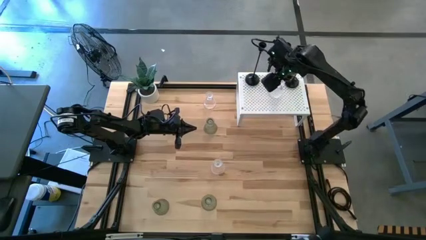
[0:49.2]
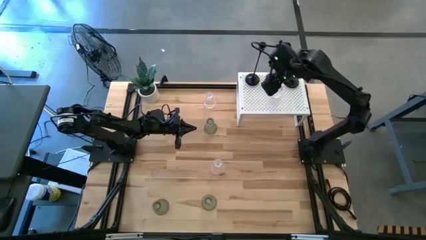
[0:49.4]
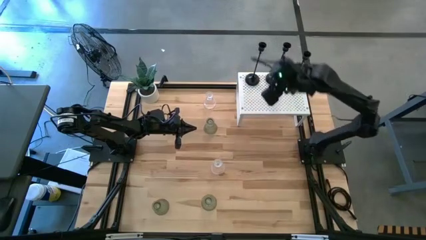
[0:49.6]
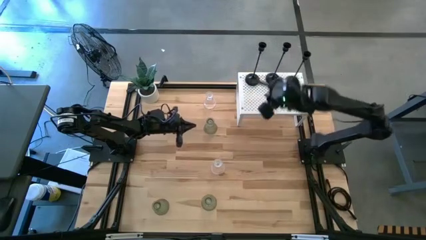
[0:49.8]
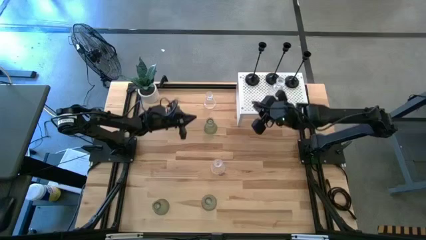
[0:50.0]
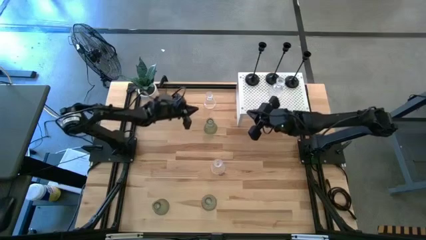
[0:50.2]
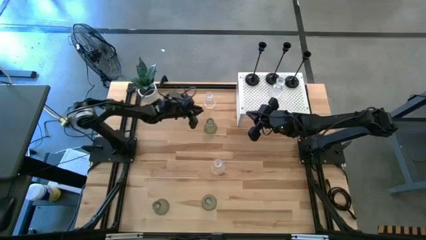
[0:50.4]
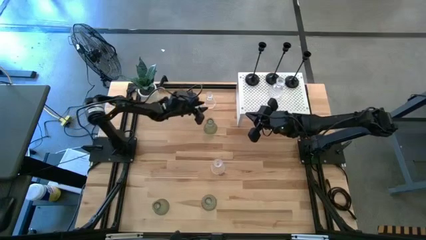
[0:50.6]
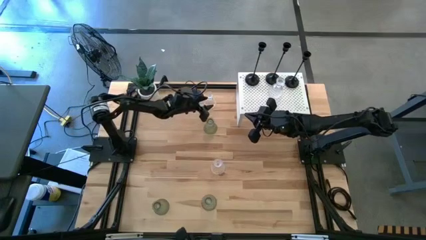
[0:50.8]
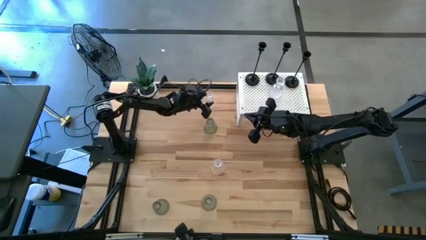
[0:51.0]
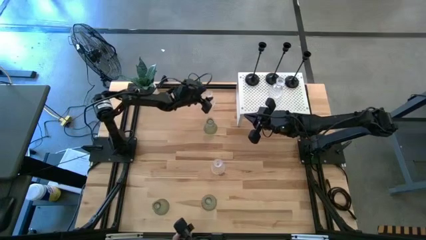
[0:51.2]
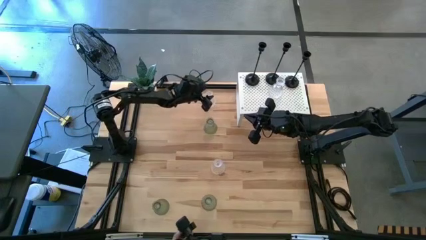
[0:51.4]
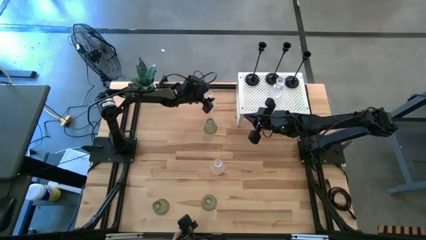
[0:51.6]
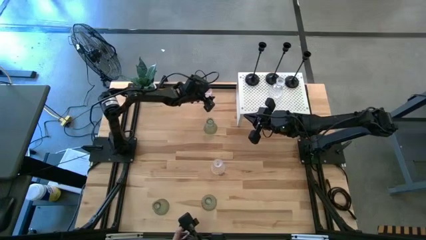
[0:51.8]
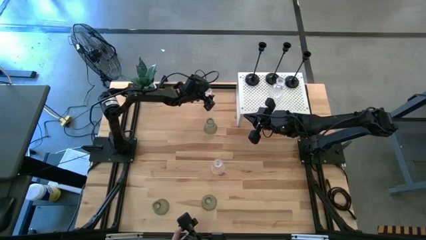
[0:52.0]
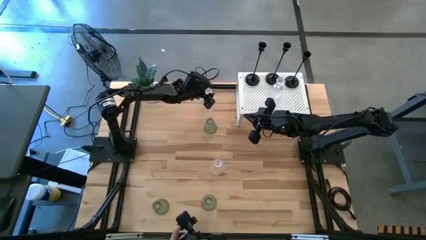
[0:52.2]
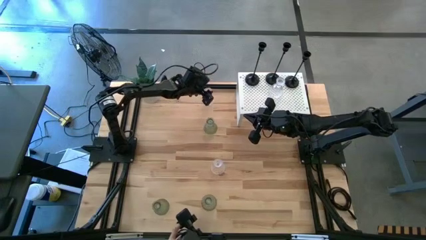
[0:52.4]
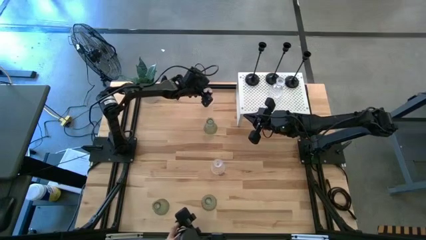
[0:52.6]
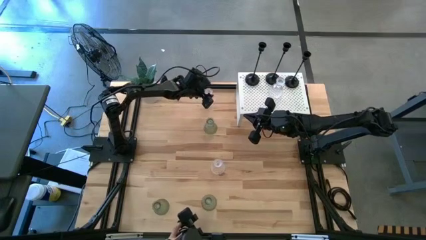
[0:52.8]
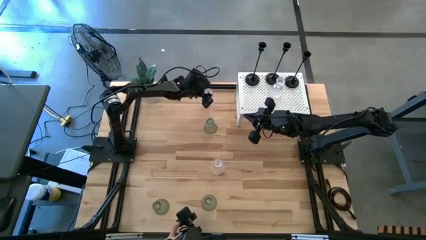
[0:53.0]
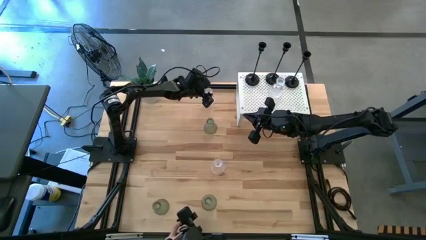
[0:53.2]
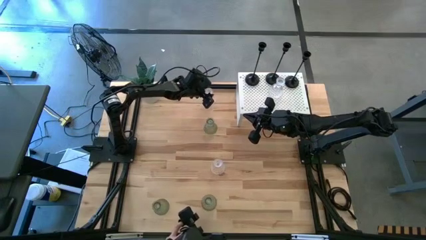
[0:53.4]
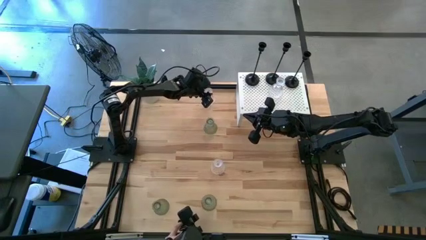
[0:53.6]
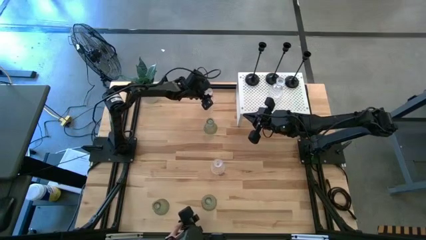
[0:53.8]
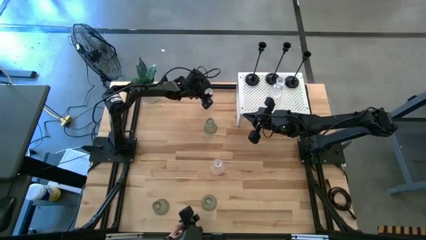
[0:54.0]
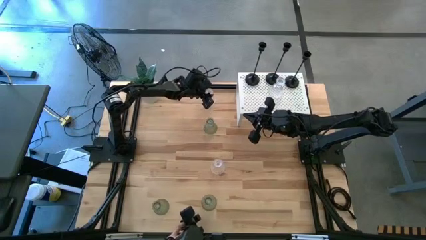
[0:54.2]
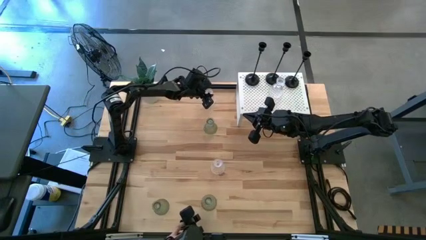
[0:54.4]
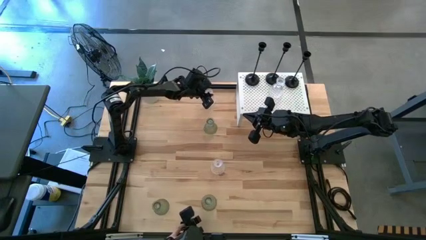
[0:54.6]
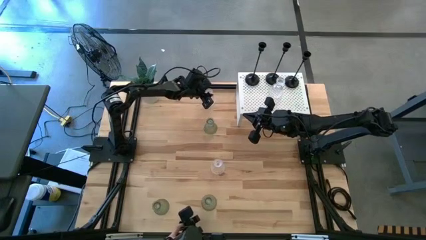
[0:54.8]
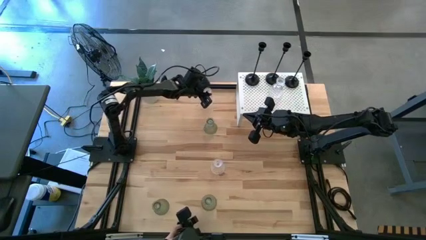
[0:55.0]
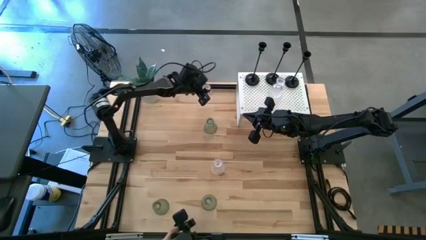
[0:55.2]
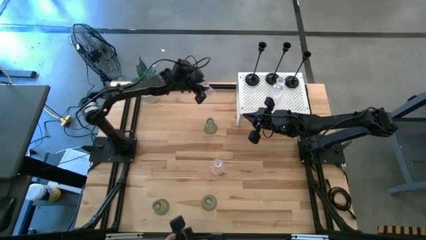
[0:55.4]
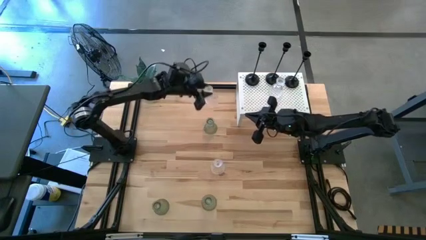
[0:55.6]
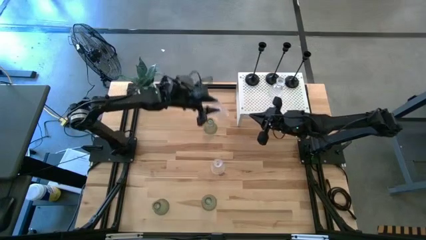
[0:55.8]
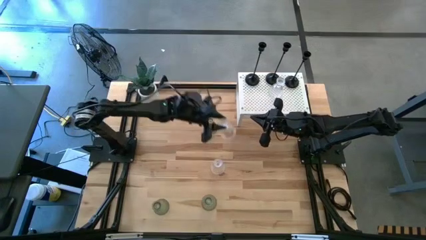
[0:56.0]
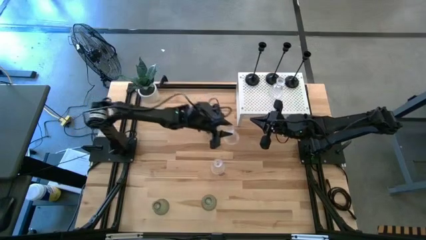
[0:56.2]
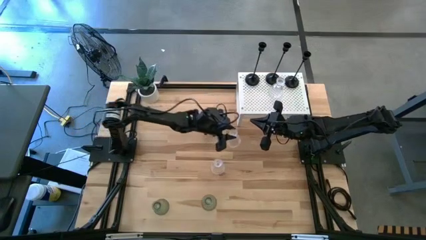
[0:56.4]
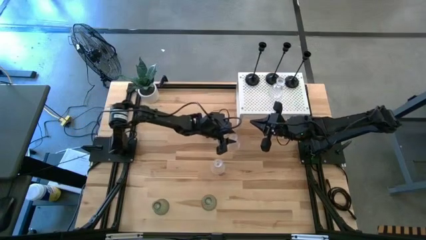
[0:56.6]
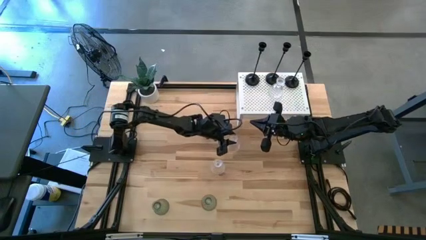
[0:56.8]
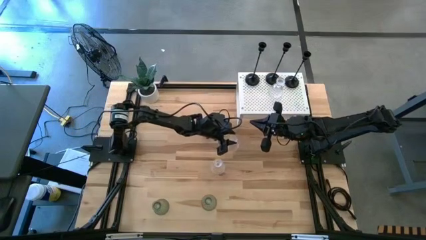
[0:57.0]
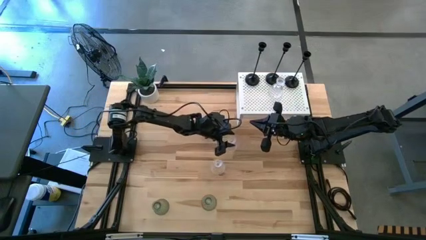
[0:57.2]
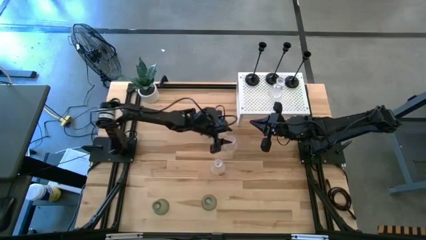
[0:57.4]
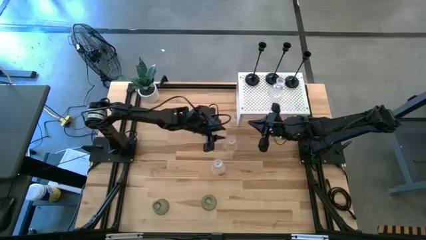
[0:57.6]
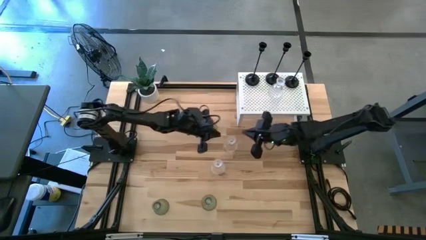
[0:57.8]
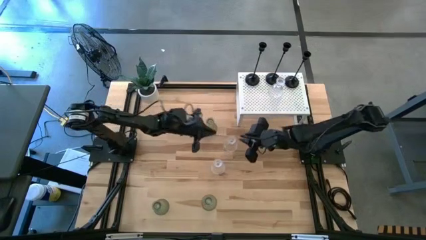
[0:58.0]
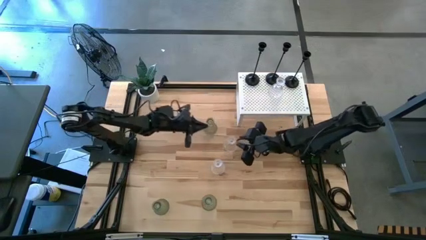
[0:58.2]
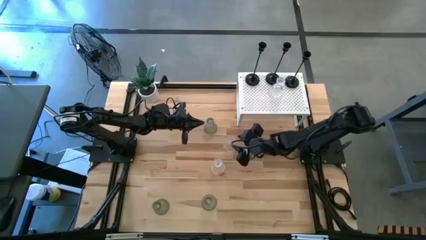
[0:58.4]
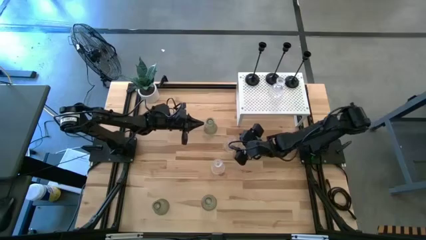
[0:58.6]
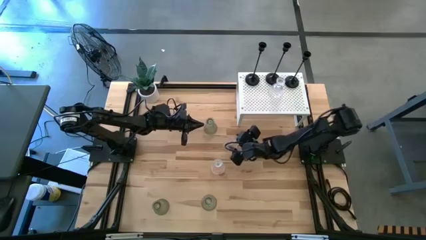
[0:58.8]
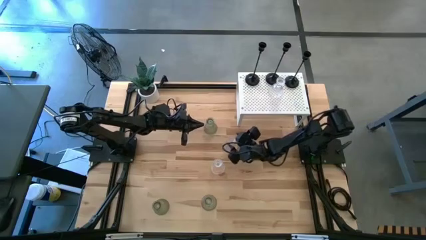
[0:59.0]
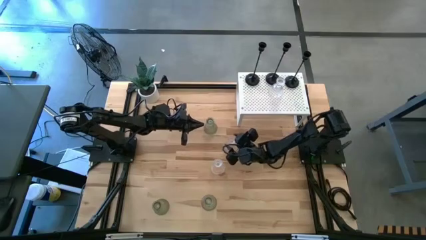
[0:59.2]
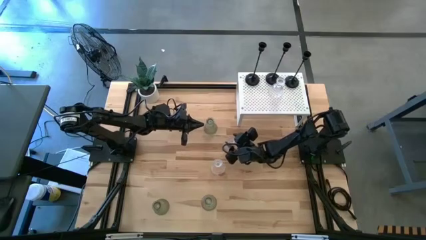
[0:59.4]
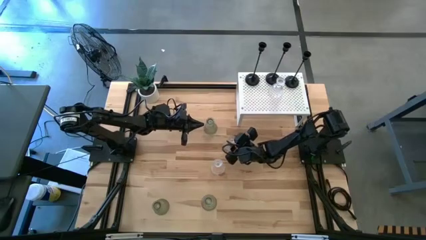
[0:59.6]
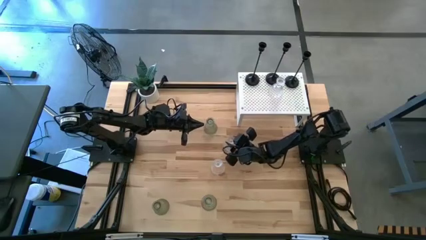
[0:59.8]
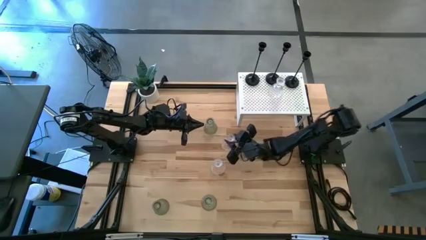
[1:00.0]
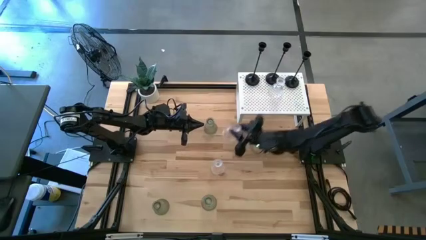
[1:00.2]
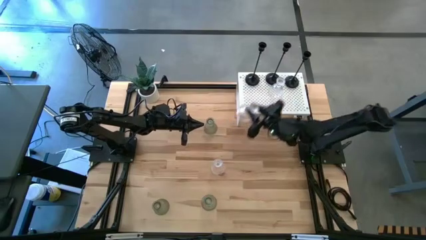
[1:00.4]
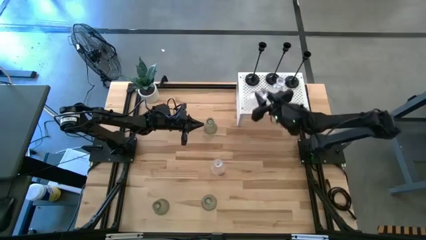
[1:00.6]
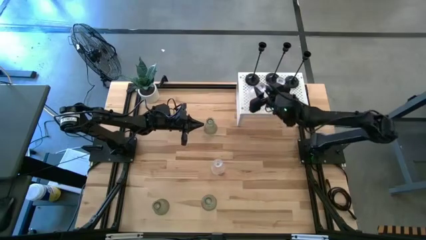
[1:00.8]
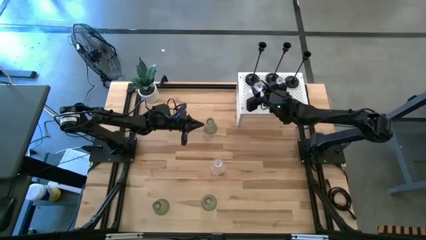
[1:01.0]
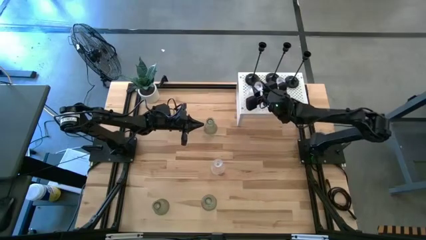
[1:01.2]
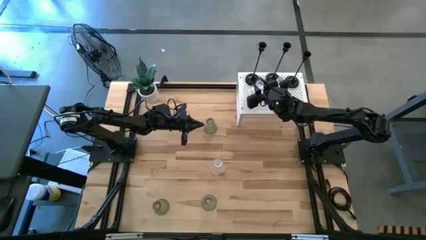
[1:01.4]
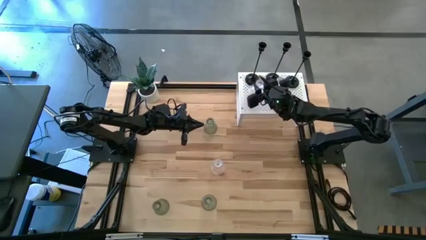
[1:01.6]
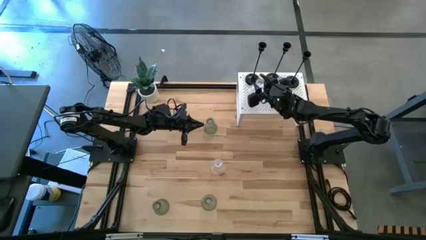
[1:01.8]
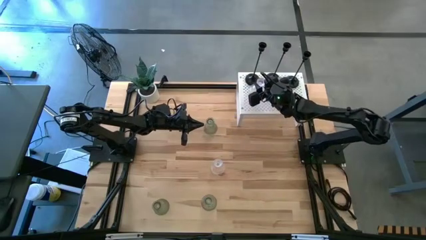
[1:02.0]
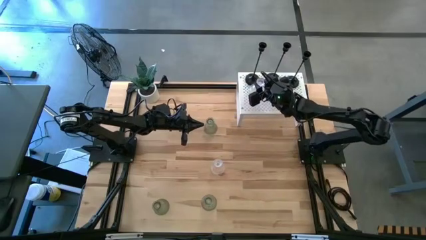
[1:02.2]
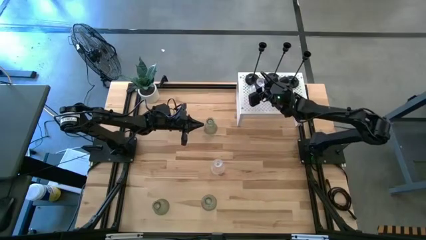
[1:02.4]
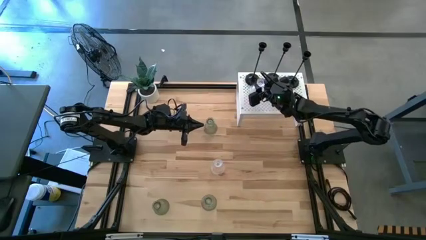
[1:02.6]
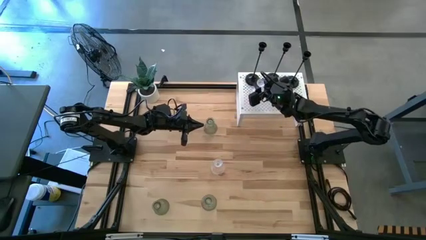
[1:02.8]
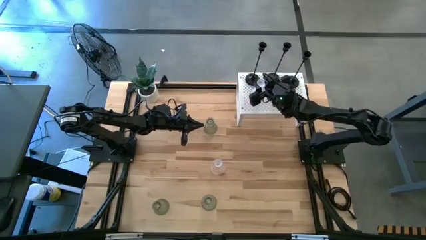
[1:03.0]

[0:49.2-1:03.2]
Task: Pick & Place candle stick holders
Put the top transparent glass candle holder on the shelf aligned with the other transparent glass candle holder
